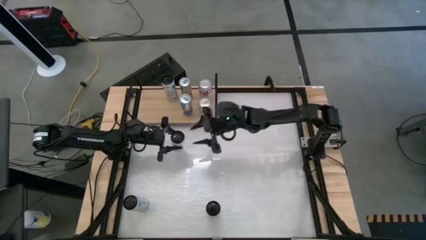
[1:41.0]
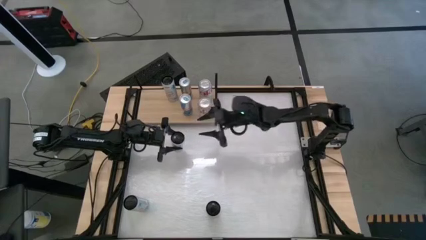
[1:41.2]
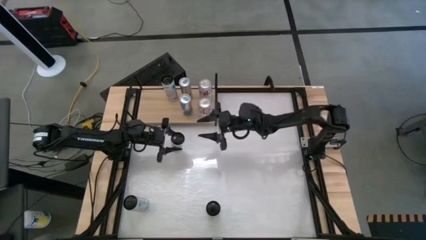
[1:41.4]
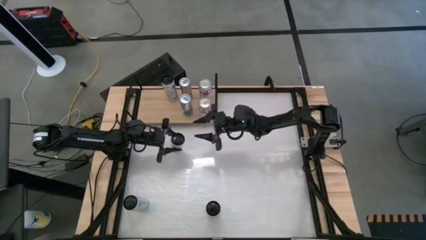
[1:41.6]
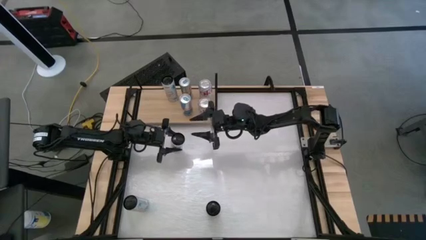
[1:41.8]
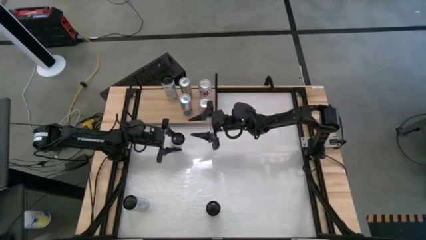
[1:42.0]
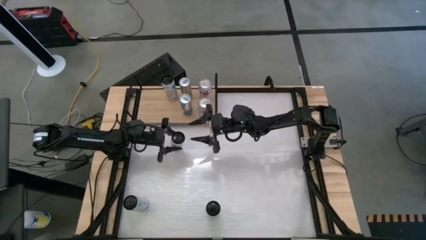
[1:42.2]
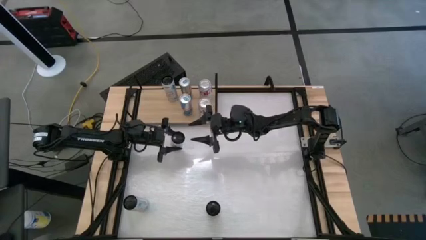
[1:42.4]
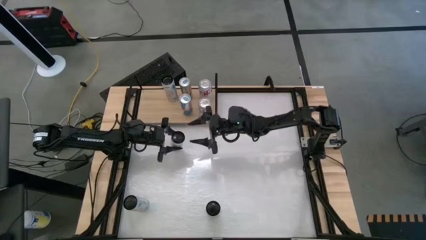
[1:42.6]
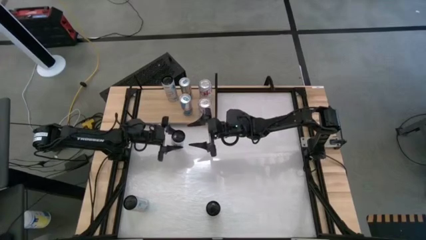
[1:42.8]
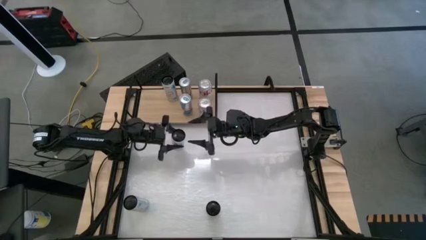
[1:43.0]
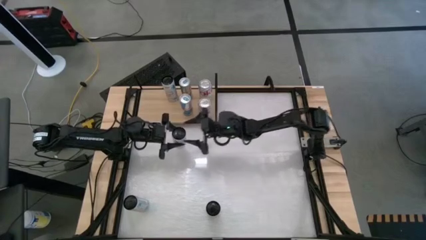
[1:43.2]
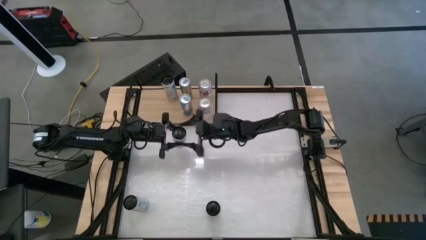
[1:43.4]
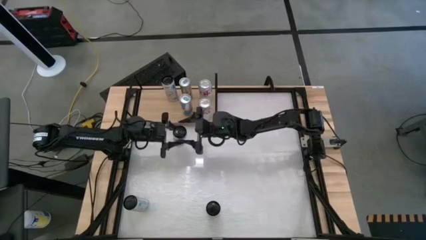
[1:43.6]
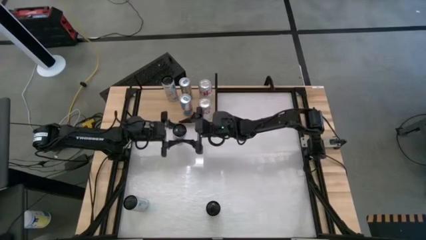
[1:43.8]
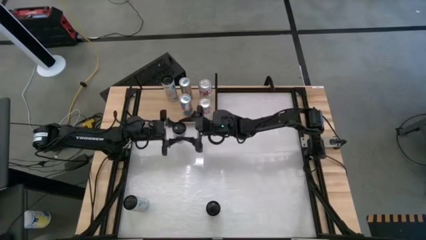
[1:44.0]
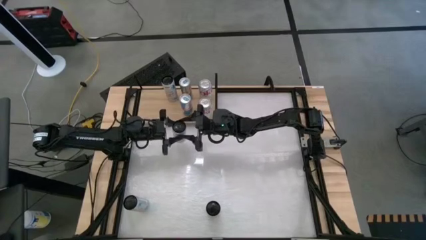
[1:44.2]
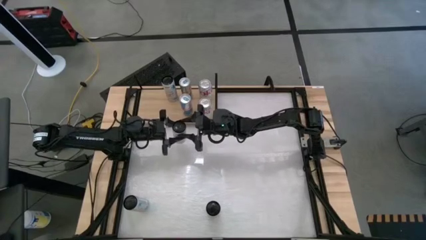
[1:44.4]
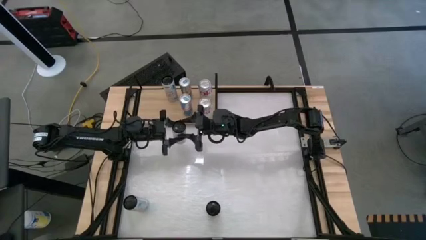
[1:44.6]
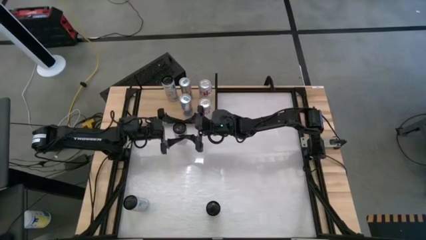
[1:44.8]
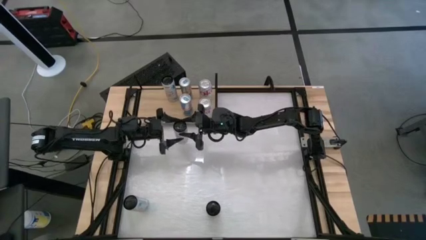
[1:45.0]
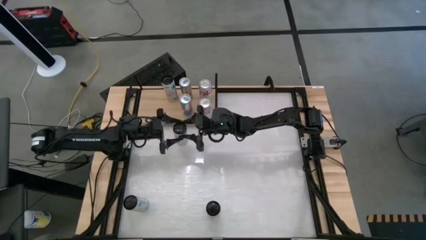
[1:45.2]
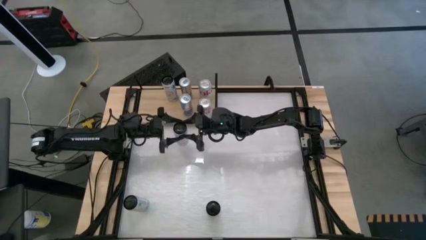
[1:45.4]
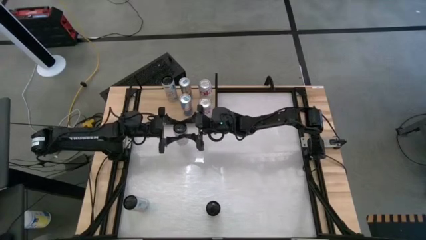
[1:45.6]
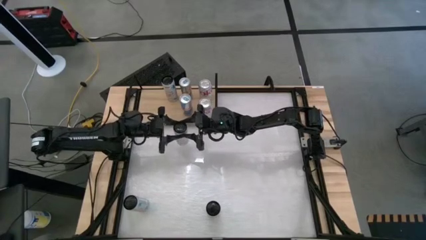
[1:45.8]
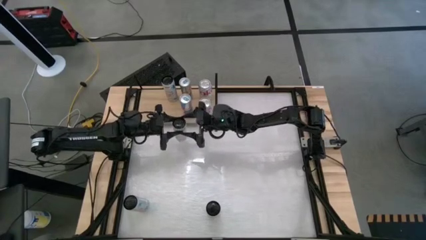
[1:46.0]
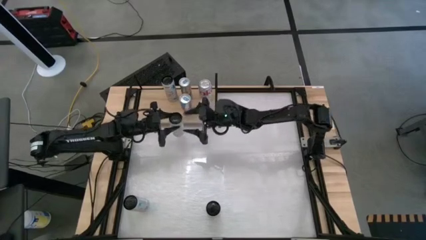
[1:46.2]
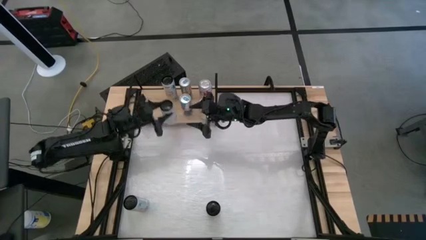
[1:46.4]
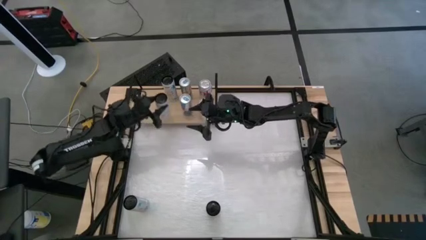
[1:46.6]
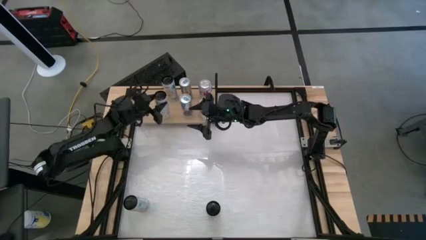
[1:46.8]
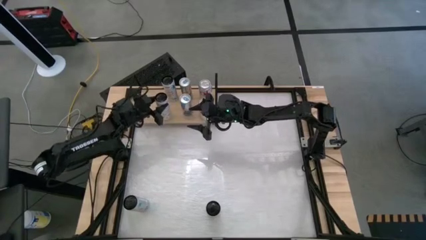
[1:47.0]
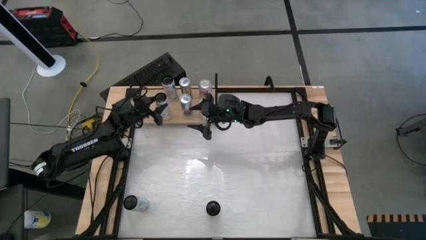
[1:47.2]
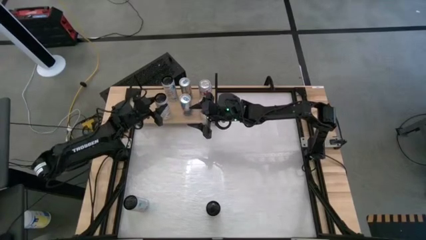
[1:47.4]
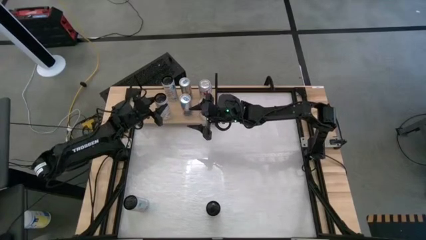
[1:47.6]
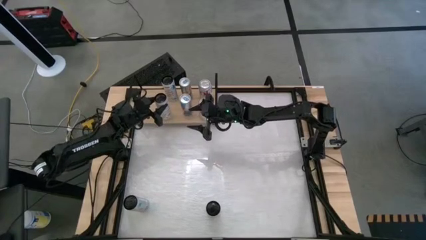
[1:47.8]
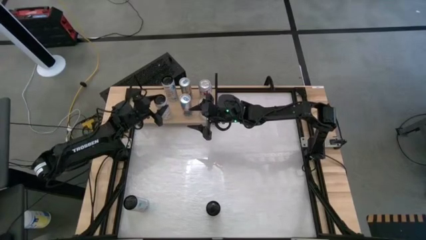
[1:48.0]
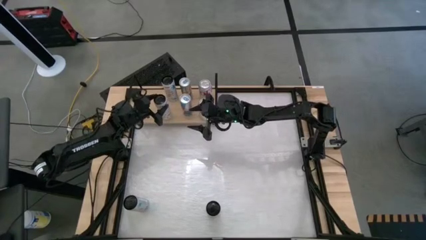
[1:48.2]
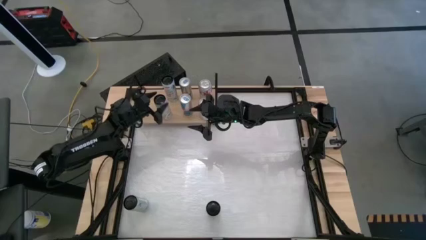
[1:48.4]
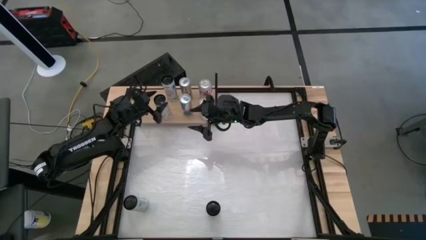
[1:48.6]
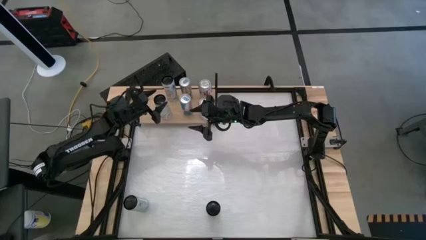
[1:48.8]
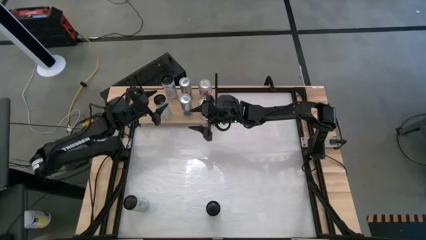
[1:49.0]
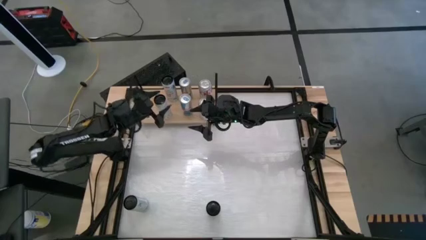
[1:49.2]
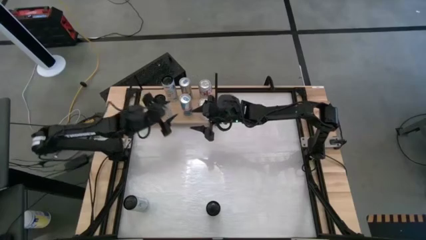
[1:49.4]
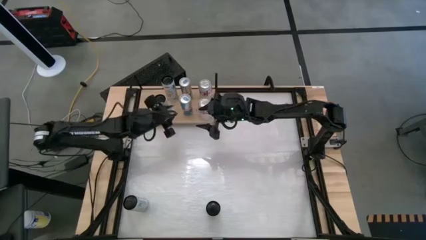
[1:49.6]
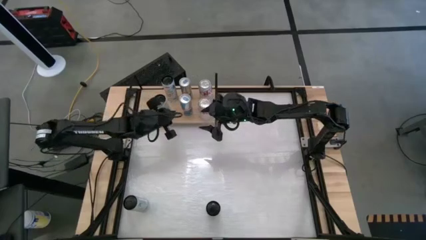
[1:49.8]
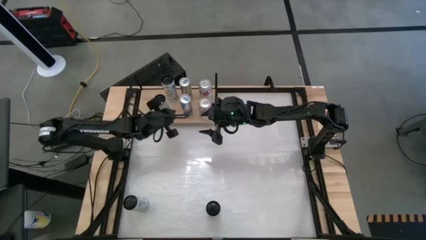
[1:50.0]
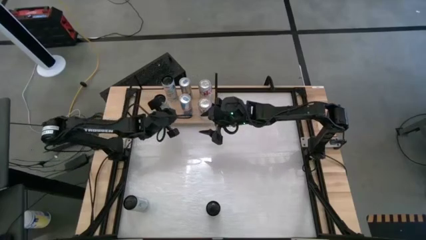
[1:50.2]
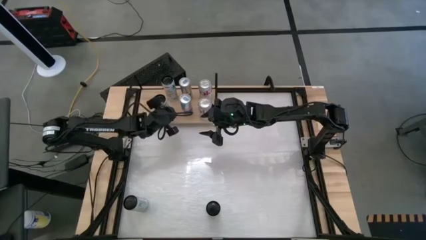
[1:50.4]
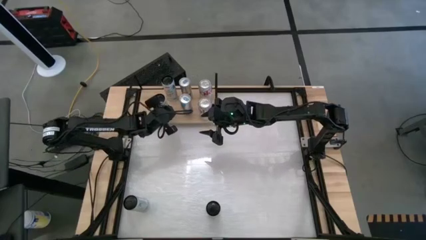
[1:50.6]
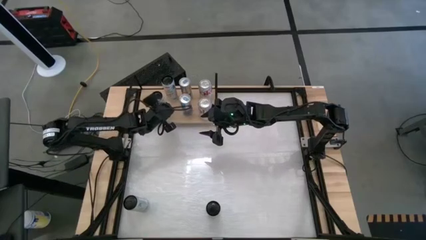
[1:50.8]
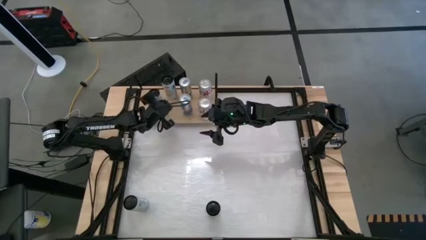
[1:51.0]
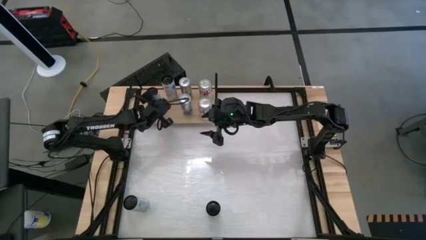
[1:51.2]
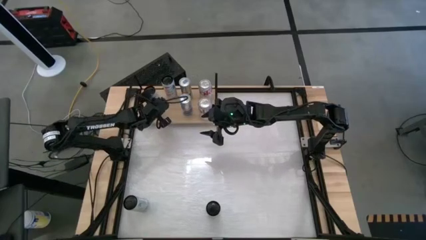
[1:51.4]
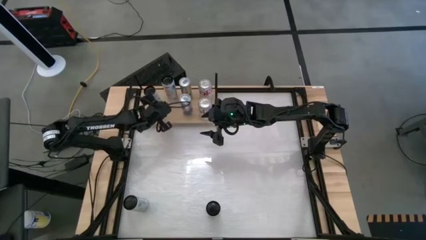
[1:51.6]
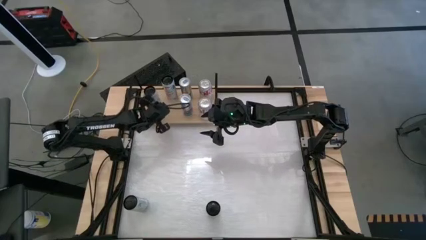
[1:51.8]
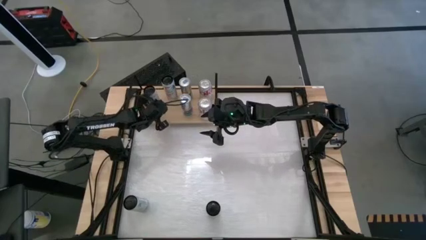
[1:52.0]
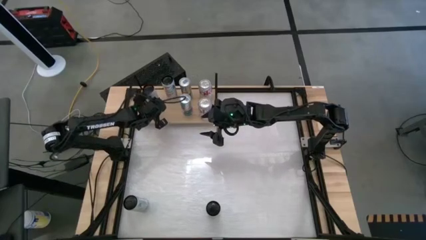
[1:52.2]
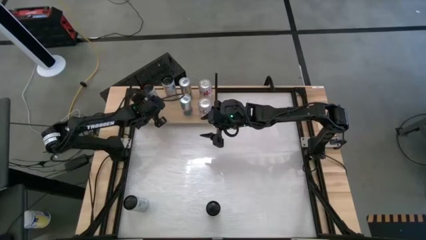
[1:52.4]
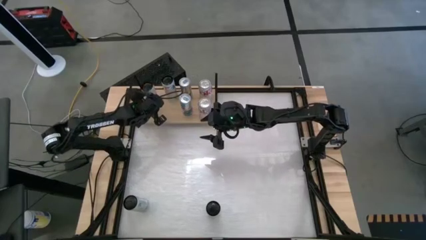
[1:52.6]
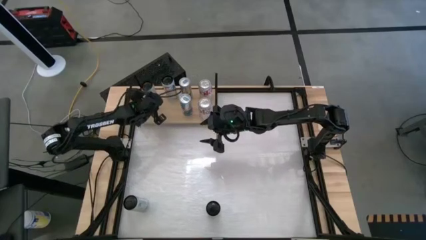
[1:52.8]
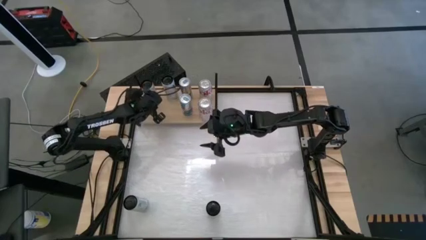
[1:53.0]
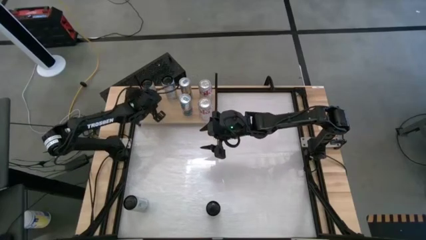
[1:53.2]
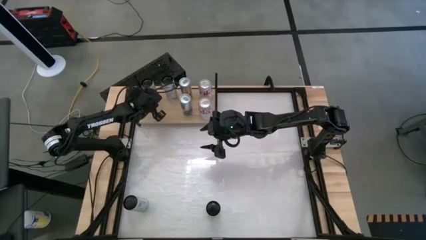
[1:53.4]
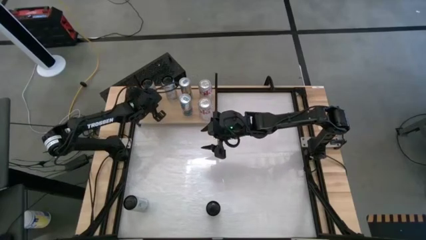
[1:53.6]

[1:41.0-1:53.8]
Task: Place canned beverage on shelf
Put the top yellow soda can on the shelf

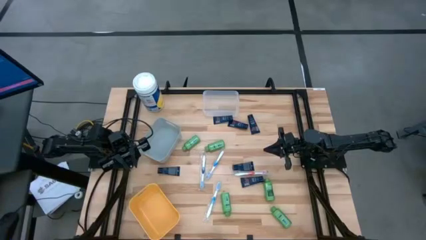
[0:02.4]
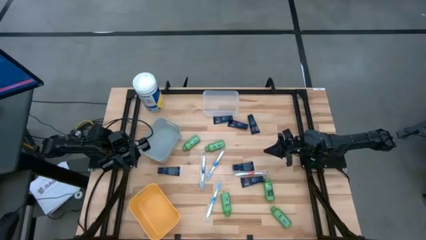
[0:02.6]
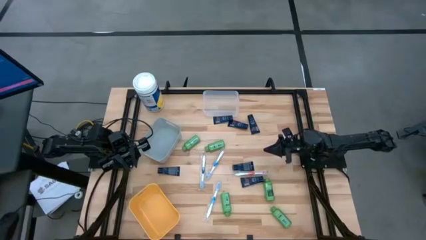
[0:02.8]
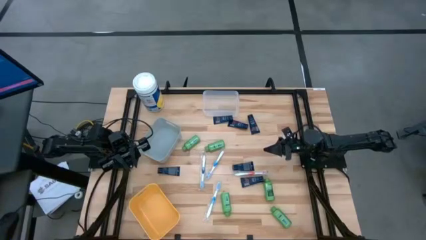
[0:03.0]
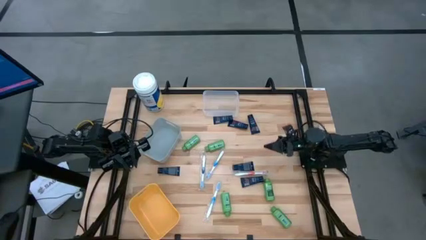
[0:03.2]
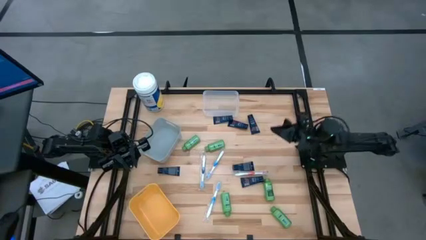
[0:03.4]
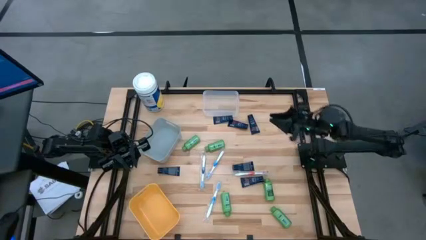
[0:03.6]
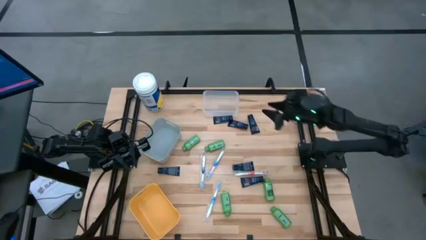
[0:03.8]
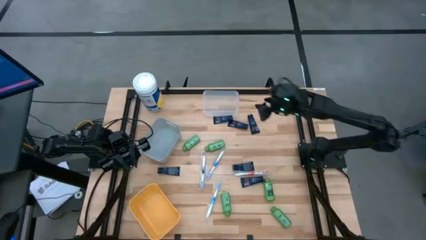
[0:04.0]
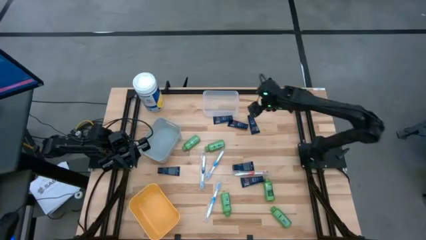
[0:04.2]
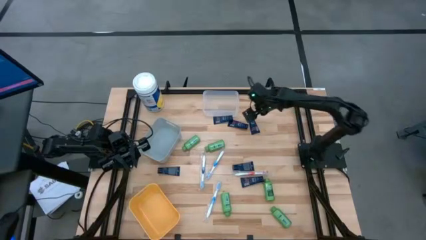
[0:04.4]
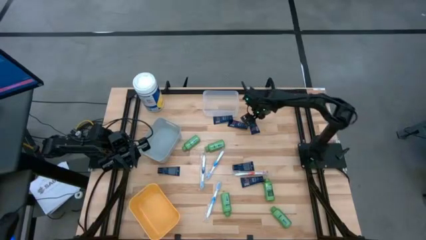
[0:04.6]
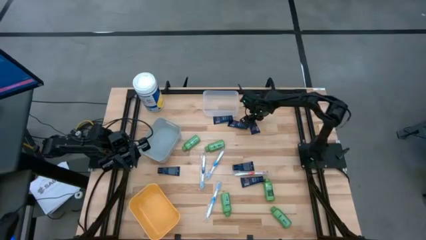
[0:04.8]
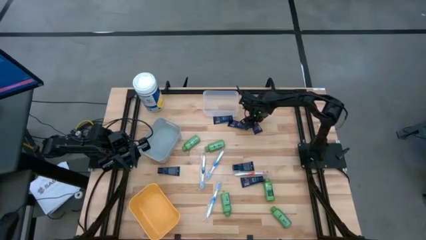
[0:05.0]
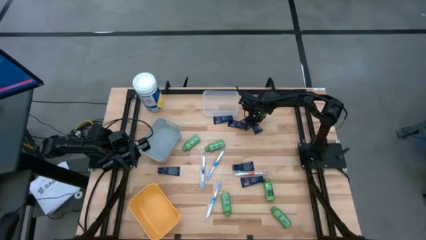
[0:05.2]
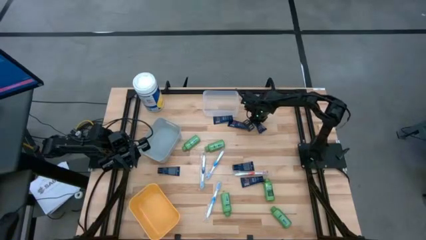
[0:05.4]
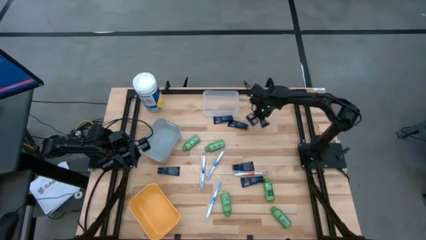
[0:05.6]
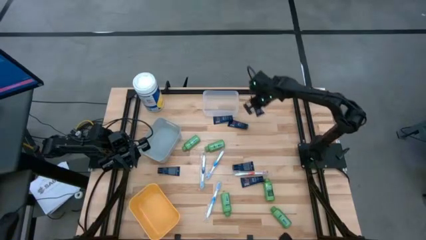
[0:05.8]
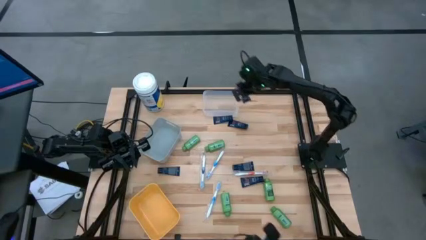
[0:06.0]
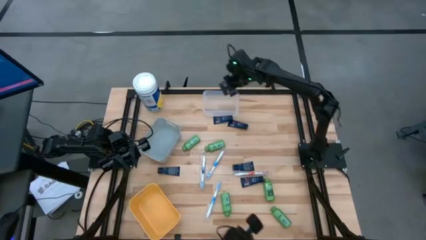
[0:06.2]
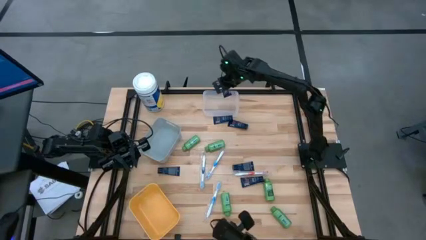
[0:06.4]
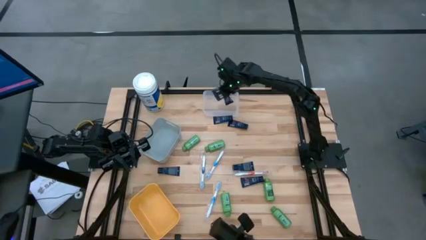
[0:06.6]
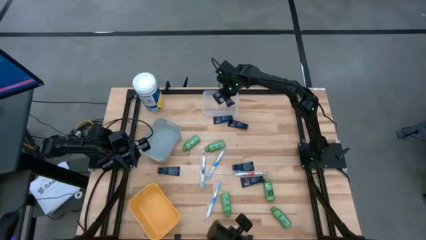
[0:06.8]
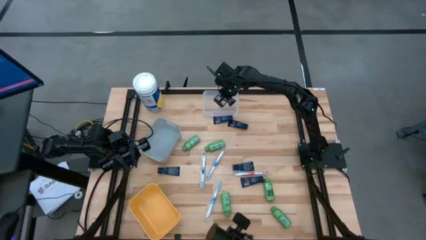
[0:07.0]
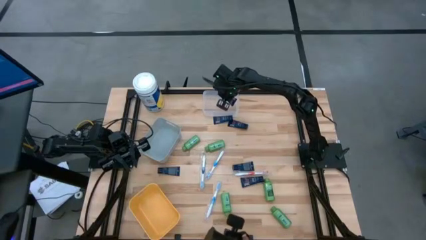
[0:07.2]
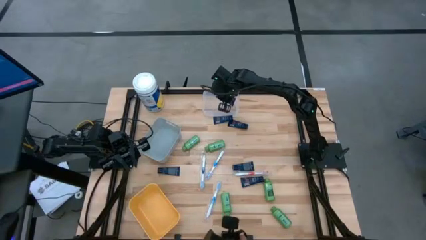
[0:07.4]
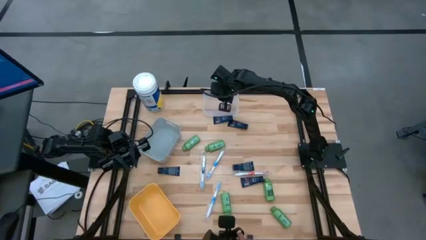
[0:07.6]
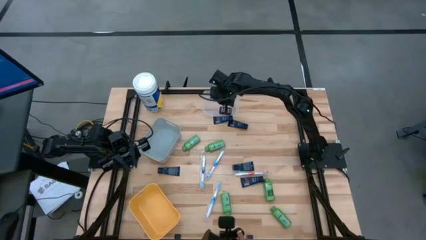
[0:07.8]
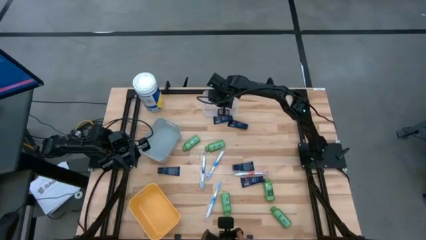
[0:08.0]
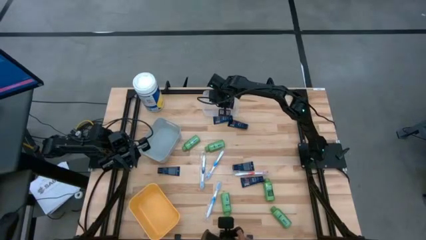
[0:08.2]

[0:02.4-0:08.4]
Task: Pick & Place Travel size toiletries
Put the blue shave cream into the transparent bin
